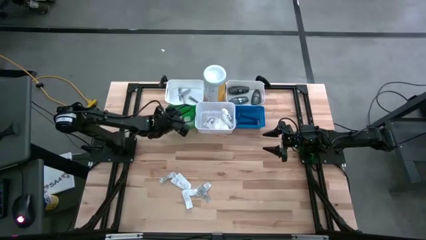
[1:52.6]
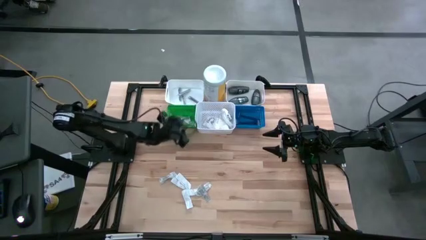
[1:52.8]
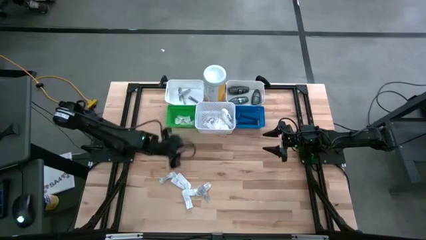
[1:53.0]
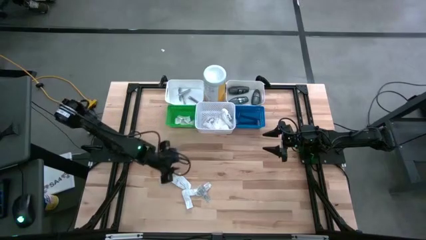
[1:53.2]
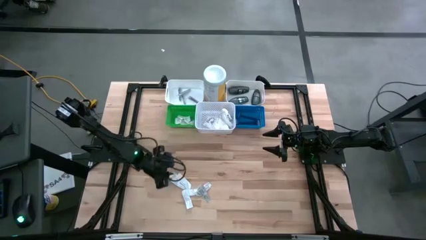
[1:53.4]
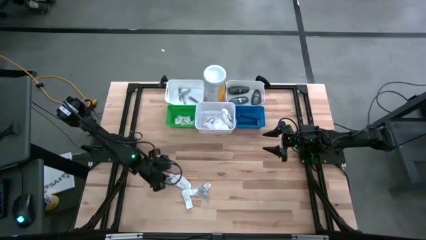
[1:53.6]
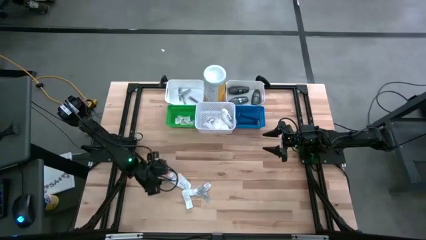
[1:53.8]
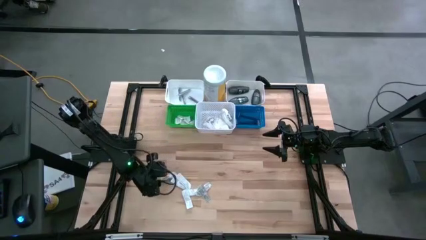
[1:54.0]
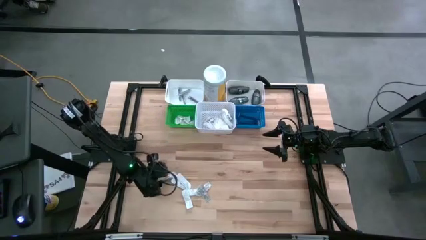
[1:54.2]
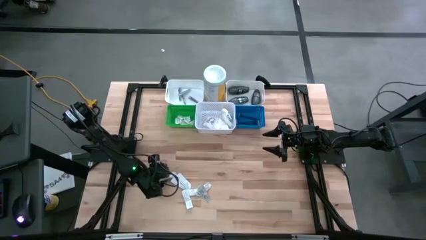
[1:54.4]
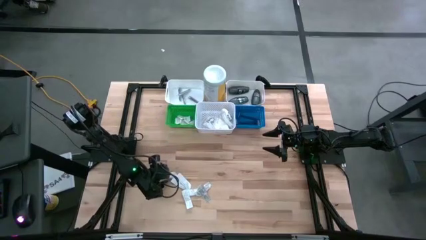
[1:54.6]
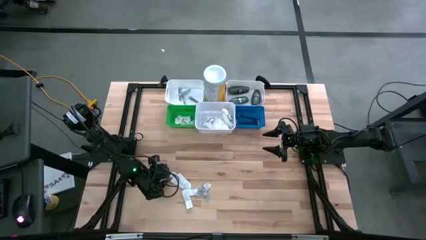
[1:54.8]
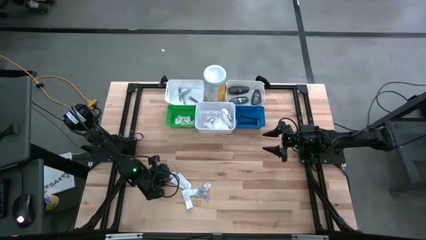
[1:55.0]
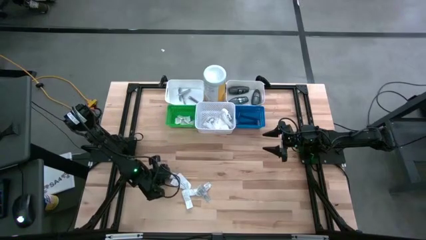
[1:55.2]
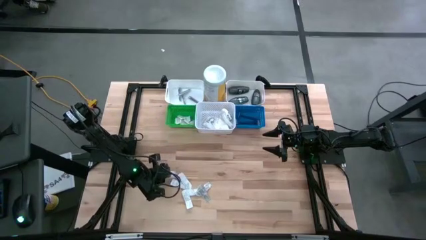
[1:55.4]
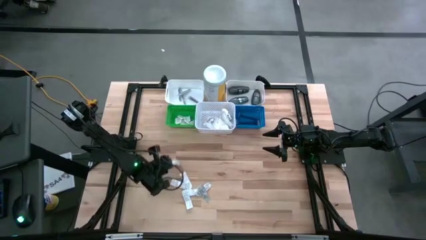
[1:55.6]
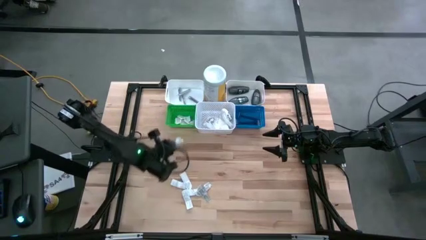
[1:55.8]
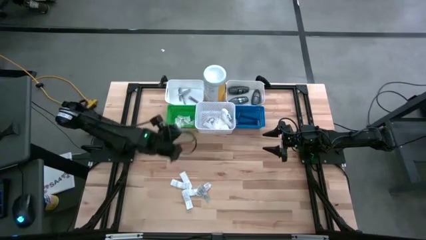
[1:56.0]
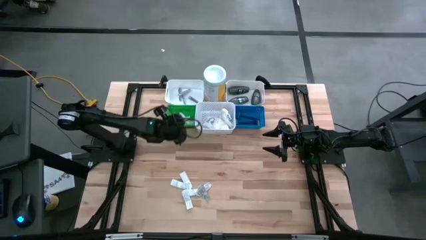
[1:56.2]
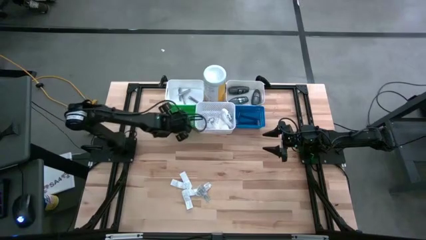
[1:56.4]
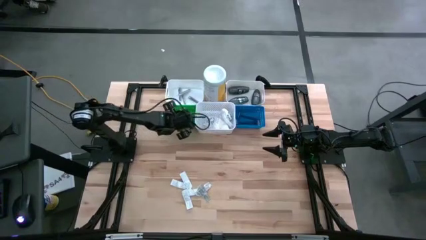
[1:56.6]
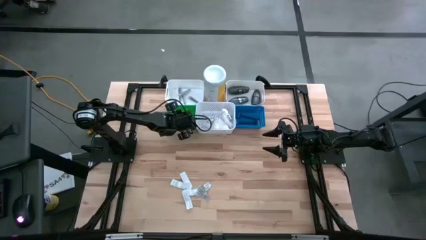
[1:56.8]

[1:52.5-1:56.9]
Task: Pick & Place Travel size toiletries
Put the white bandage into the green bin

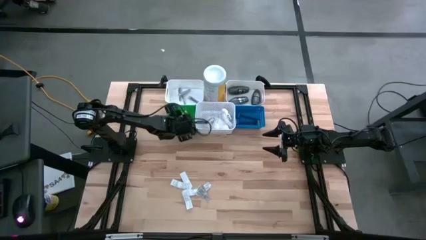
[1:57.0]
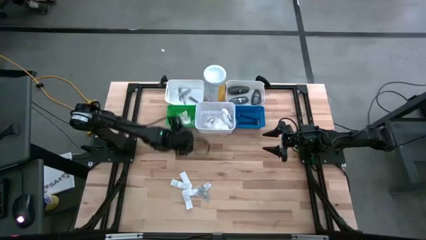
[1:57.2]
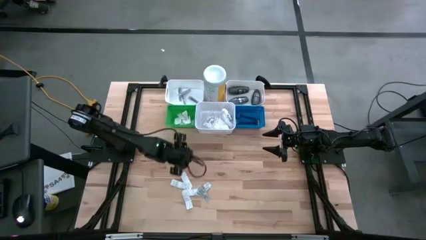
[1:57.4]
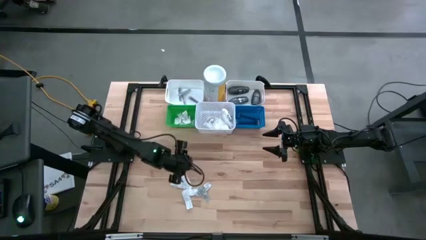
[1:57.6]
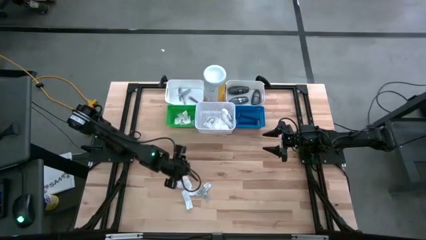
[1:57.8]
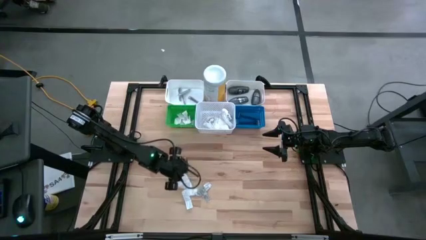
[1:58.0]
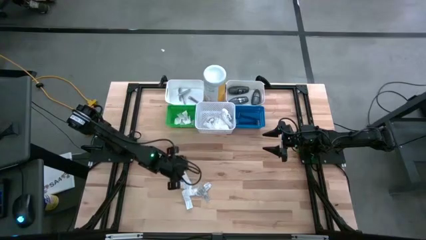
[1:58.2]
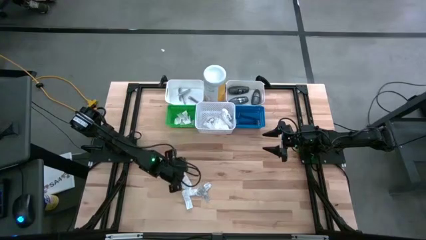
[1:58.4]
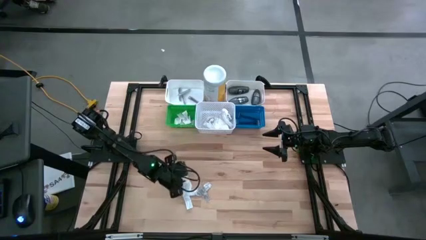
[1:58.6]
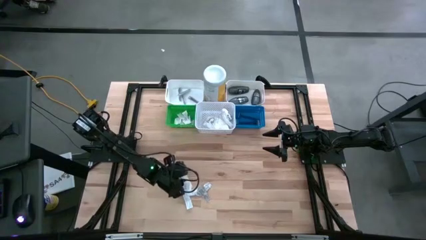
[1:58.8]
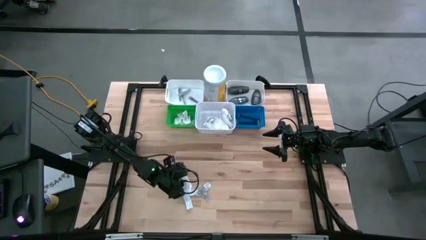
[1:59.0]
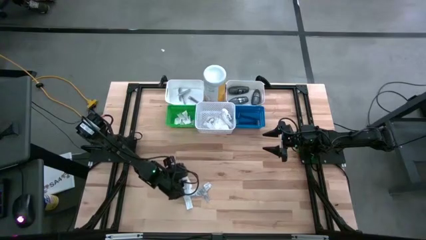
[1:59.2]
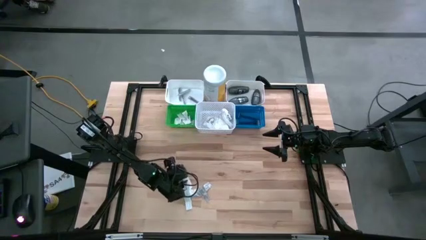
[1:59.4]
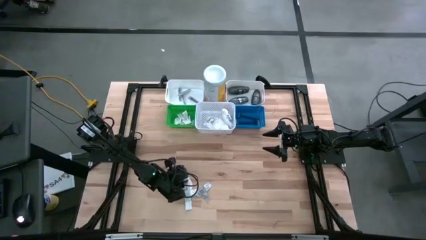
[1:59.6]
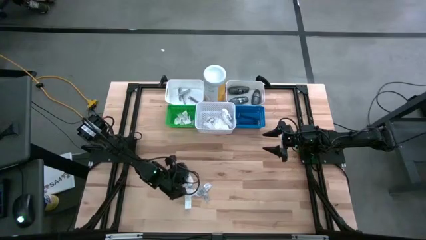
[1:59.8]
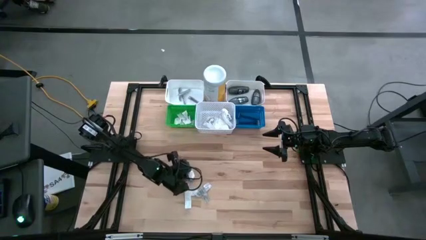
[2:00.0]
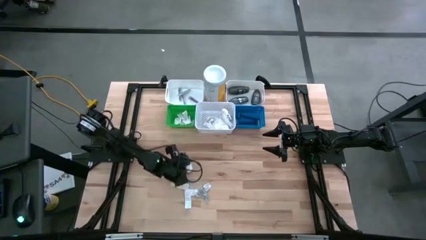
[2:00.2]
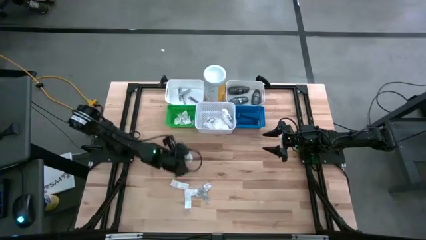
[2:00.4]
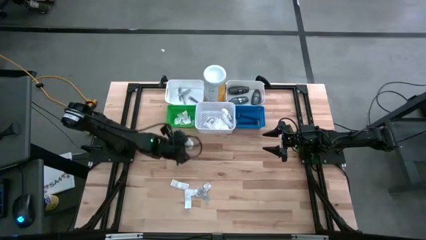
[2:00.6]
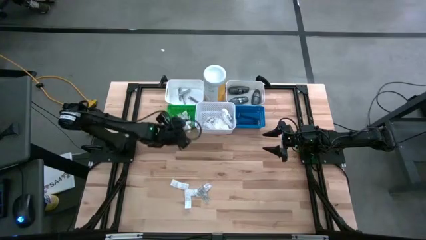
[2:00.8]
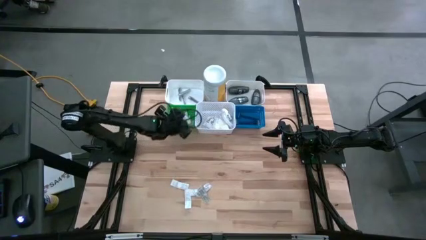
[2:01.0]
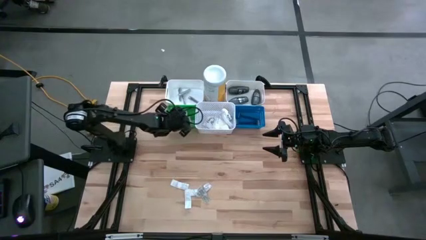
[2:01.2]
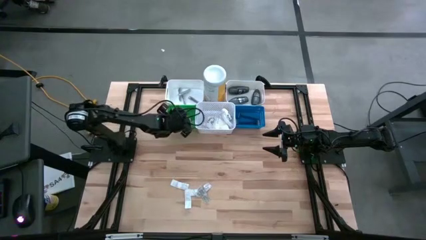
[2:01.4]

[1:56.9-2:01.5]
Put the white bandage into the green bin

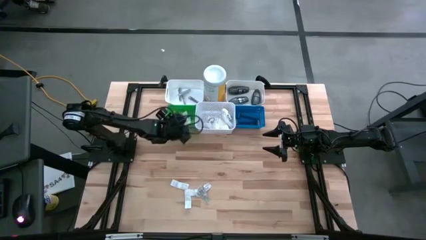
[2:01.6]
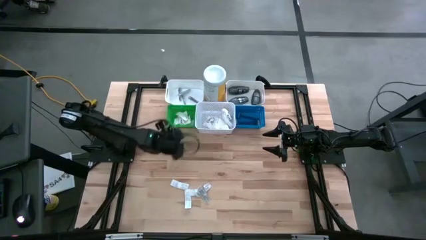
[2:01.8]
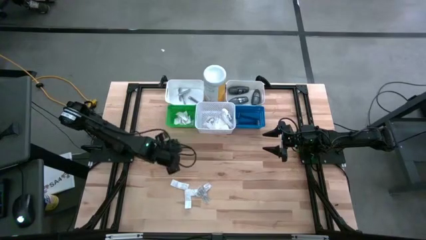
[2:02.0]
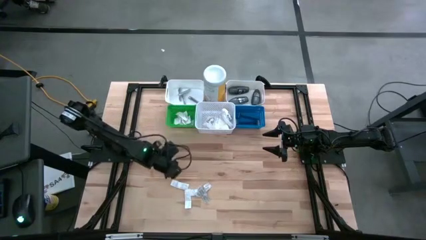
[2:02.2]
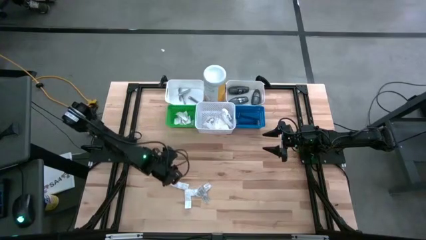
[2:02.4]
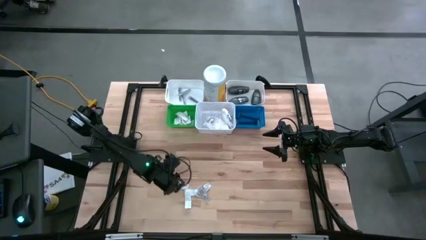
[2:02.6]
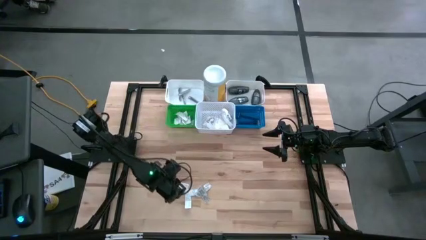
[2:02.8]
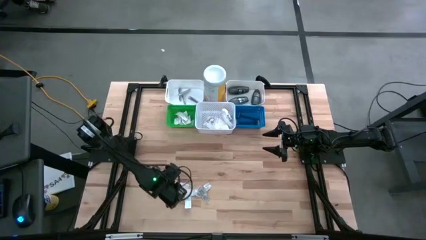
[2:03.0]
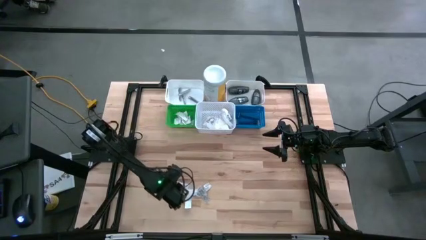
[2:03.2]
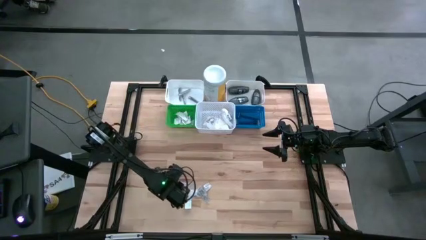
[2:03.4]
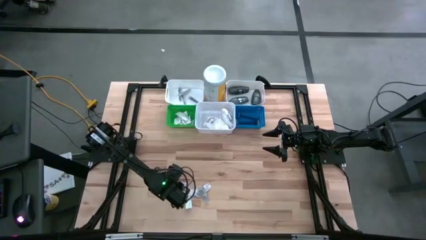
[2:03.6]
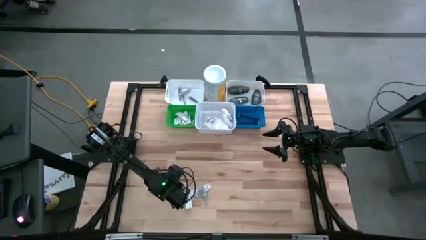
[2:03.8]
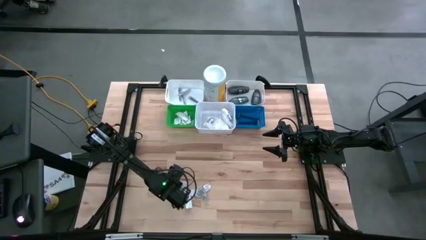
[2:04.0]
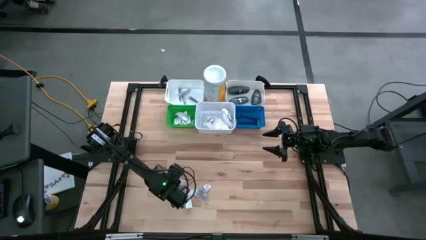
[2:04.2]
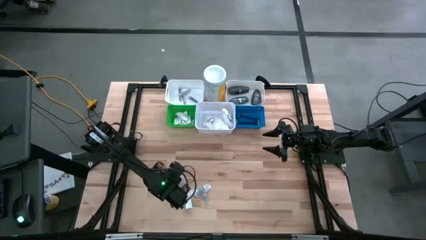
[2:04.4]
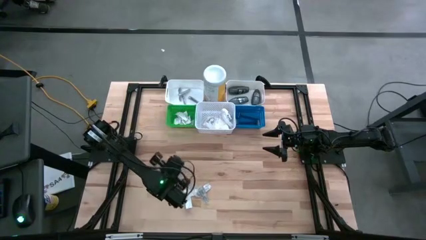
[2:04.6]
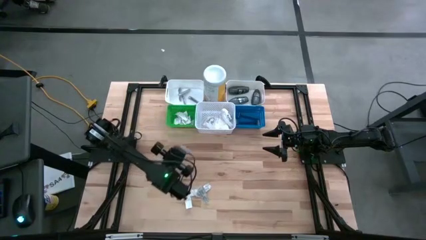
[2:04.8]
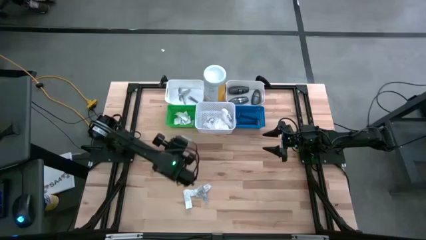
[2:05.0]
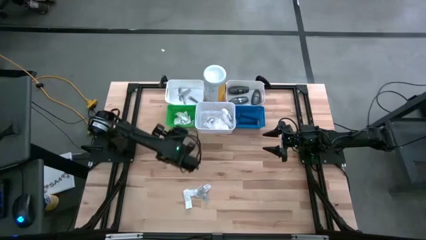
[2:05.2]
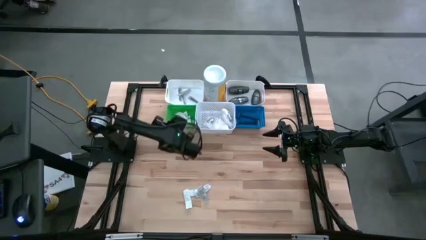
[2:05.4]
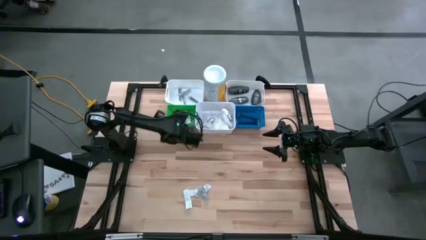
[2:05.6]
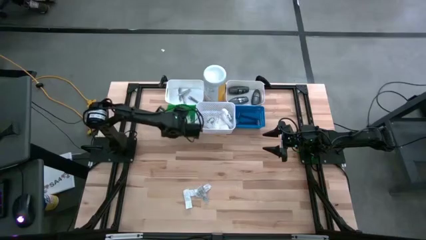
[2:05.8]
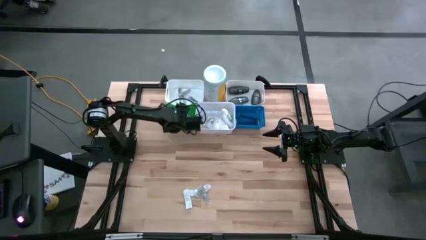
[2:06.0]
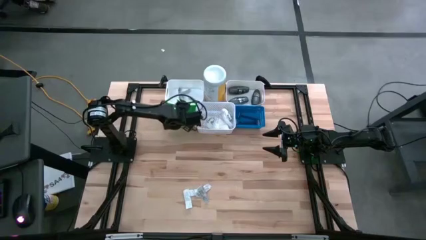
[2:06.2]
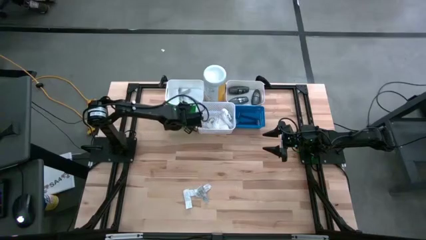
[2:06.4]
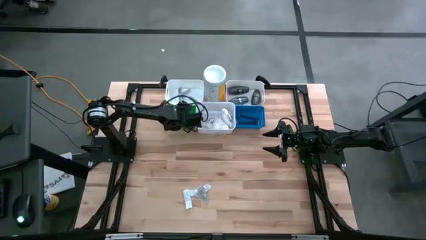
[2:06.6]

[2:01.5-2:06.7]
Put the white bandage into the green bin

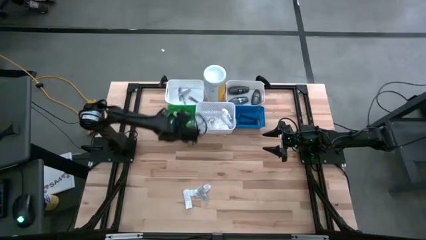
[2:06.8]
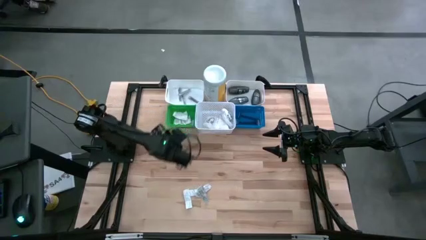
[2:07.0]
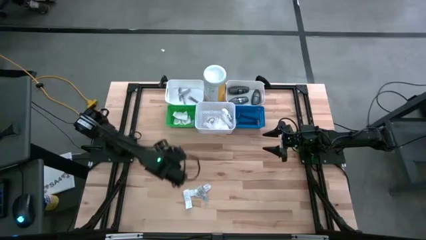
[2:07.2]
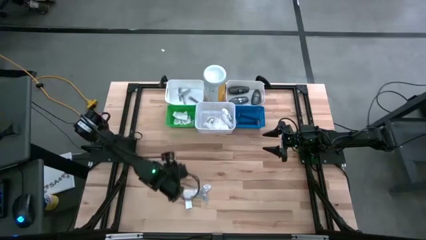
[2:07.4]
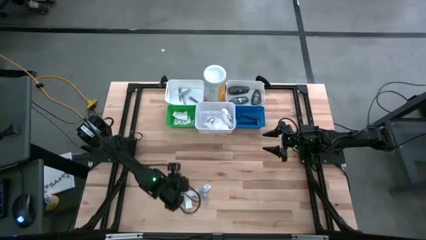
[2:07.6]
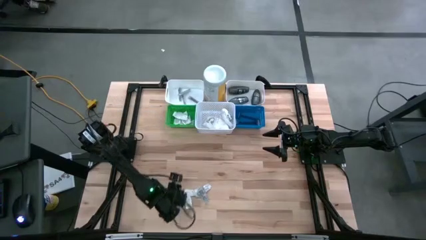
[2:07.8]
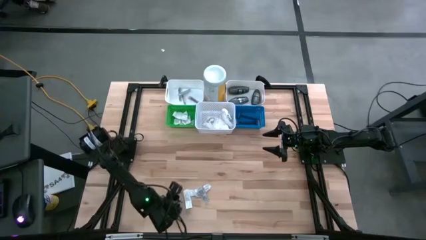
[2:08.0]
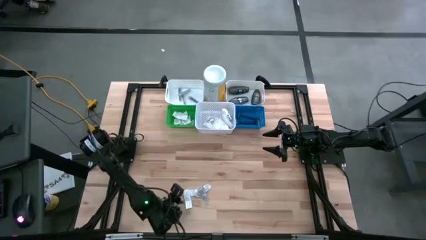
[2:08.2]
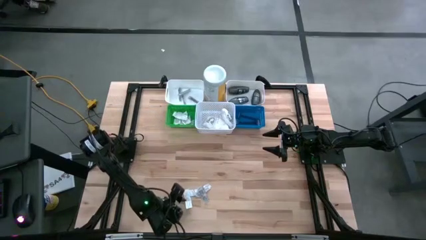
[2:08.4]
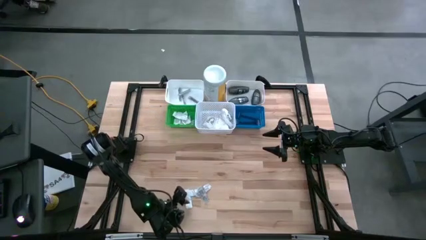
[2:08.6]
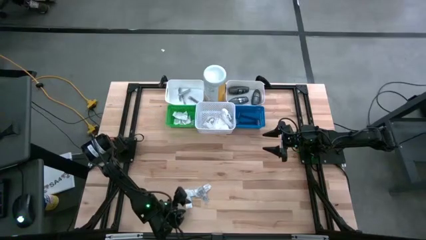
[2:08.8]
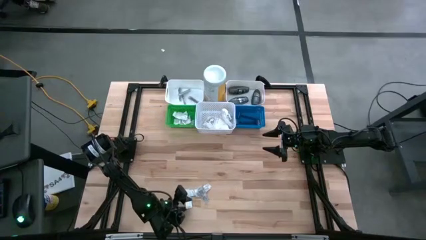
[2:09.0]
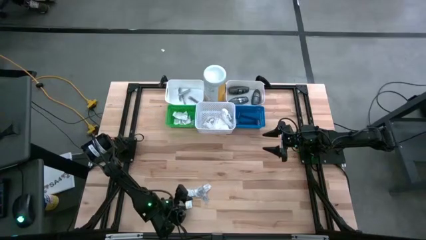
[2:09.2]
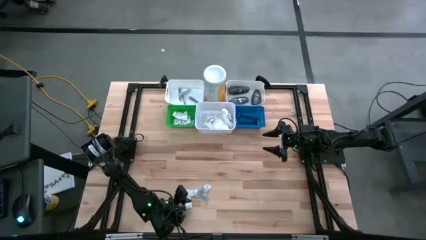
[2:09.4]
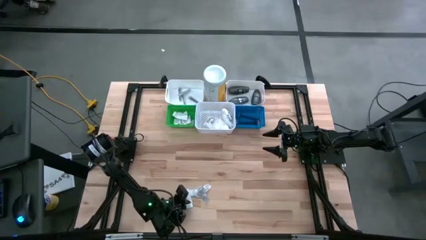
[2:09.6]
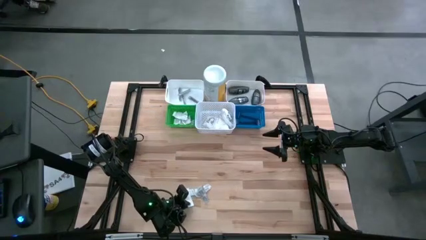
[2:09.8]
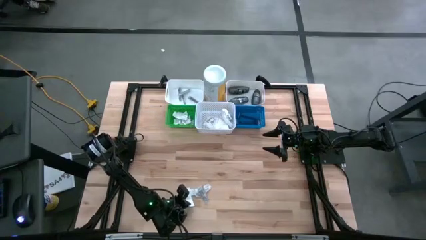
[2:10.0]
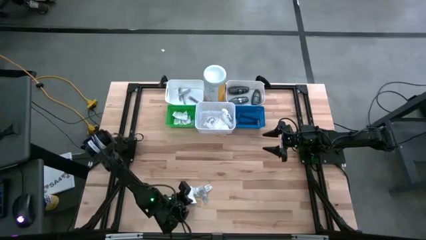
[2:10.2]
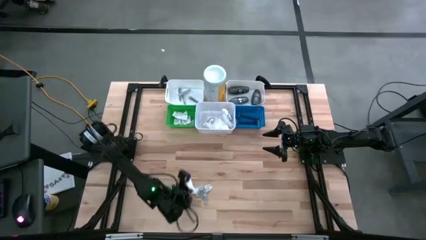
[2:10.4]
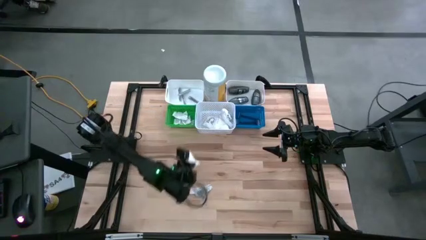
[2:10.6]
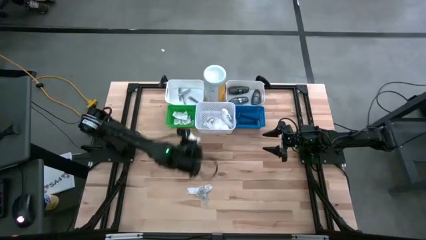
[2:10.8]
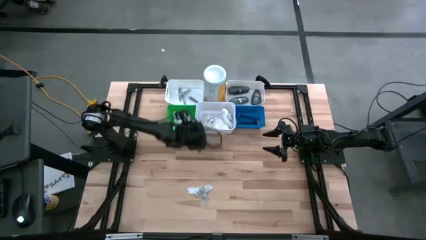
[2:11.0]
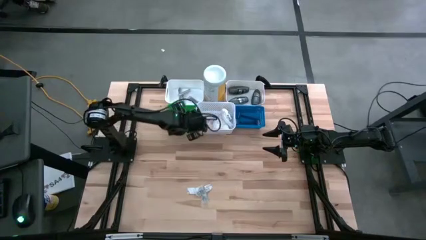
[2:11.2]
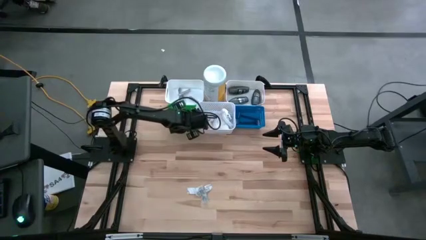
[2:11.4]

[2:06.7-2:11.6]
Put the white bandage into the green bin
